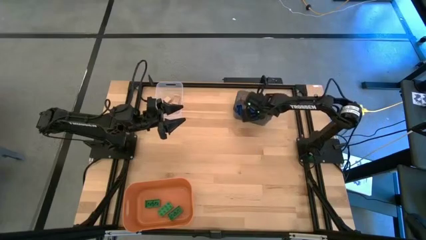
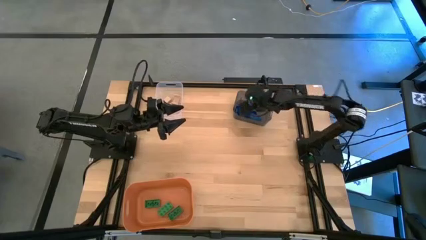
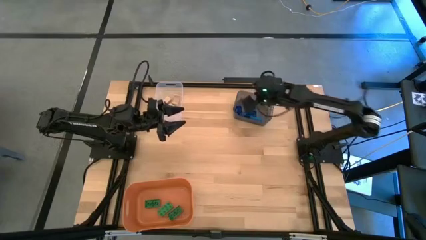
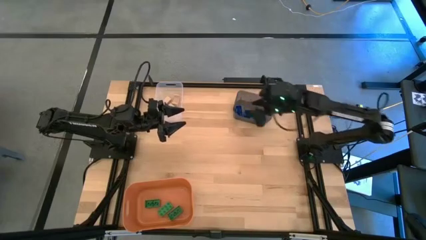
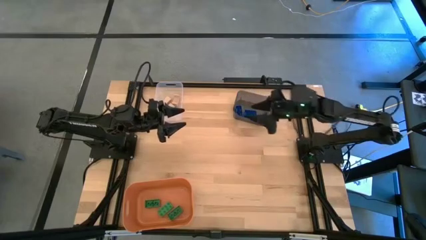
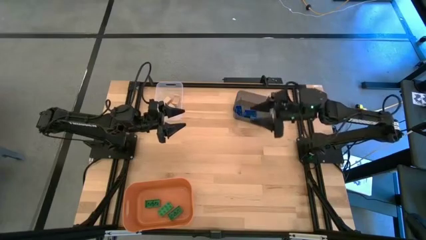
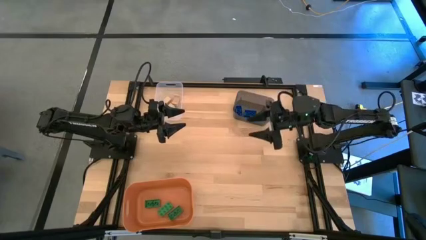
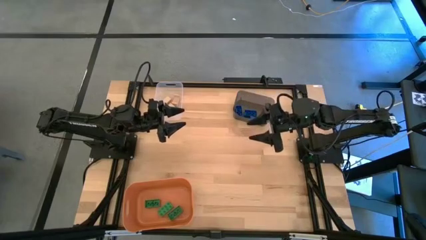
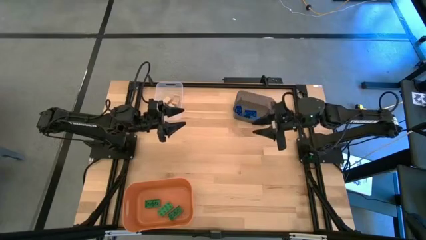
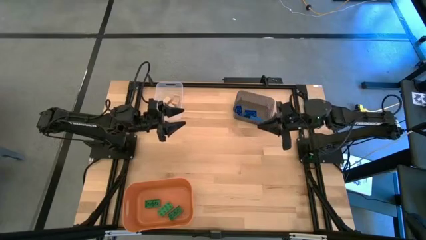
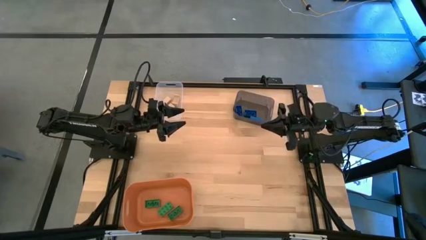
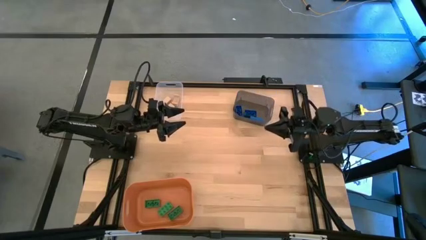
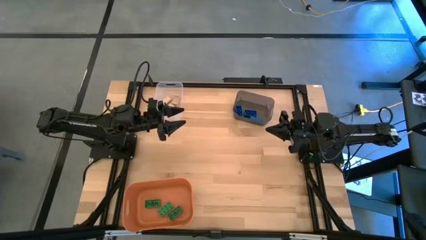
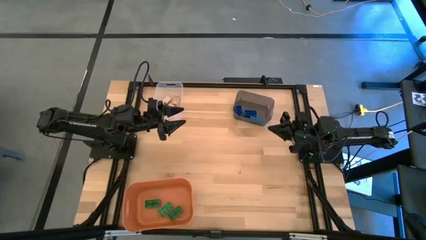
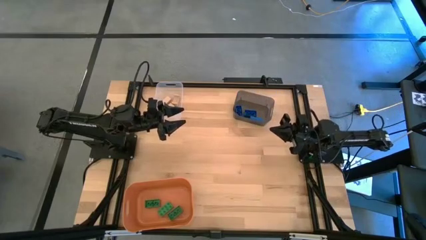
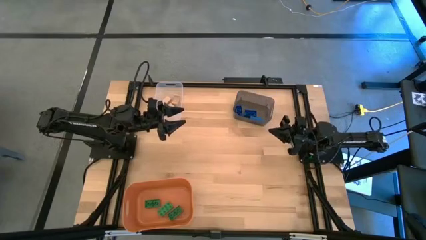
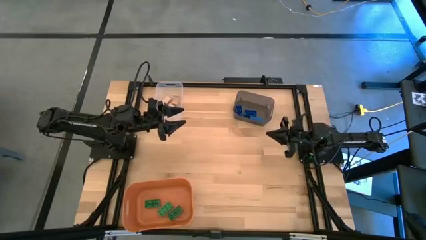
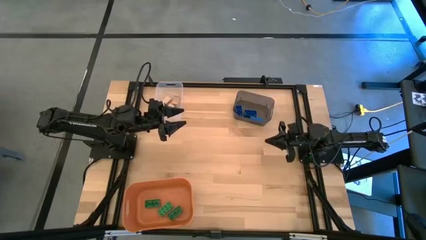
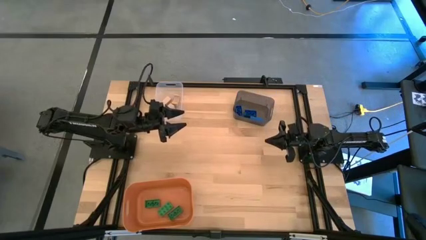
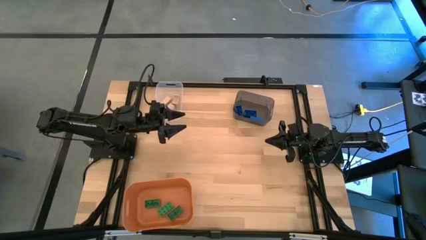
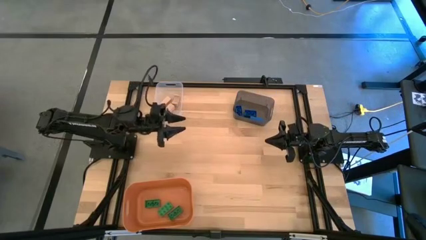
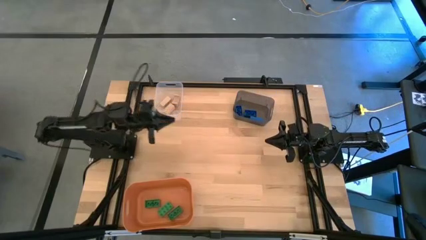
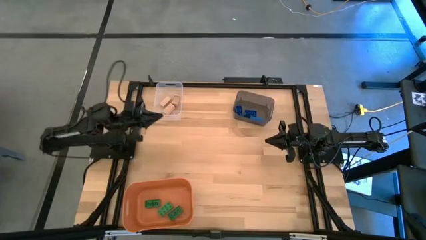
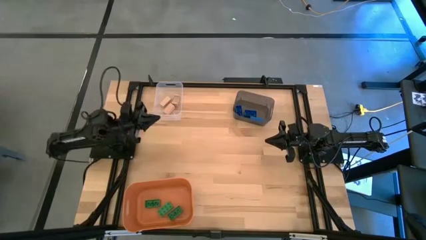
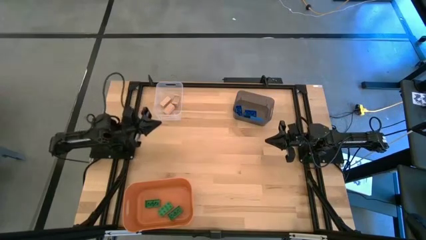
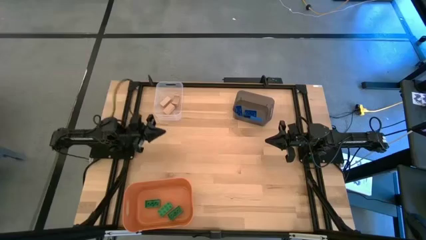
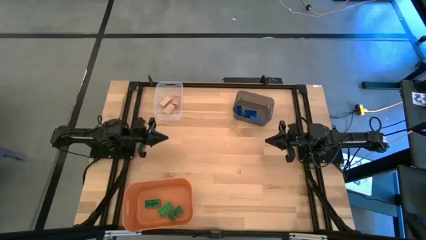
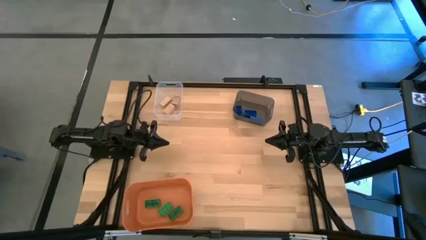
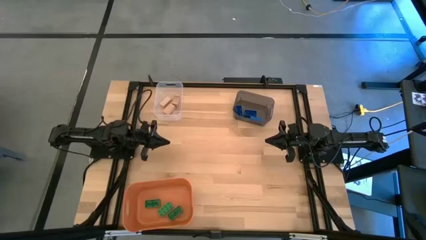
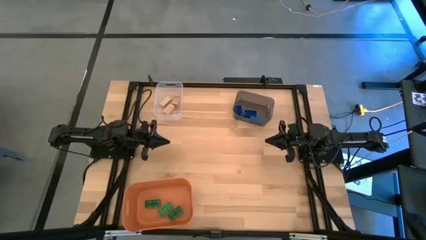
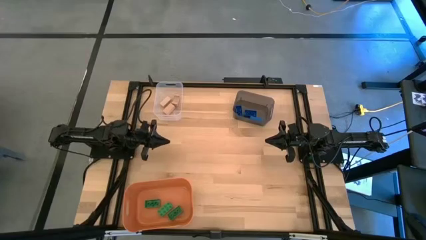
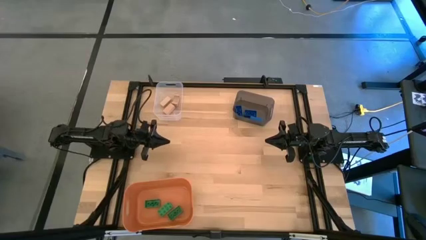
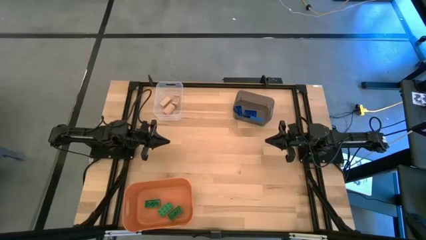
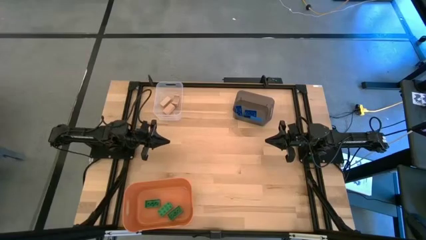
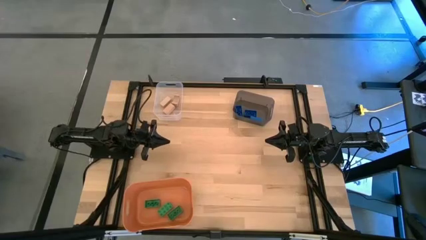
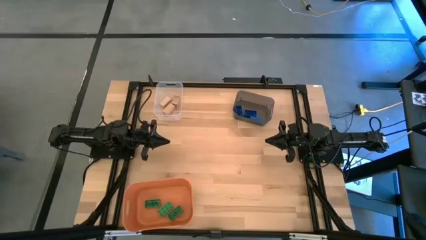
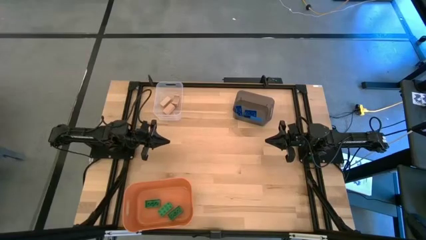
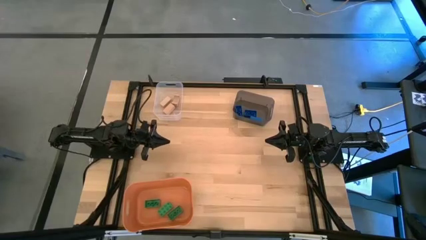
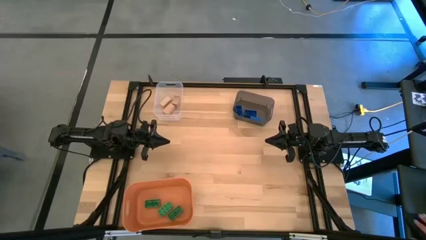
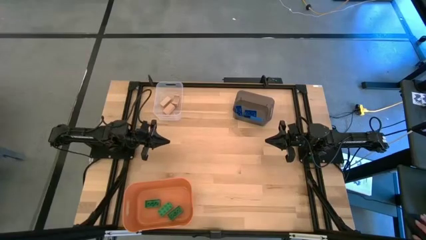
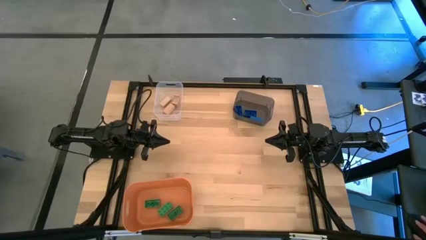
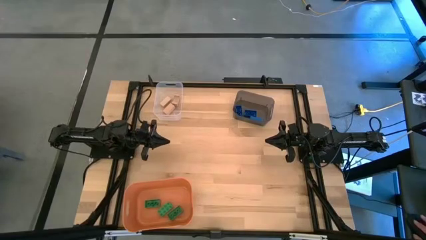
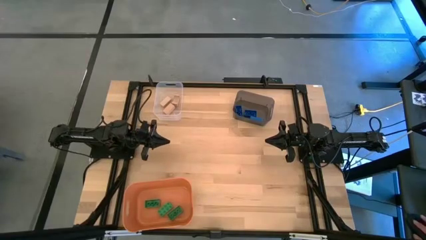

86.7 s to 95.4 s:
Task: Sort & place blocks by color
Return to Home Position

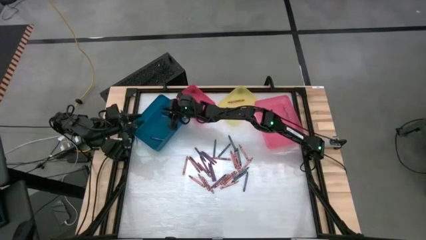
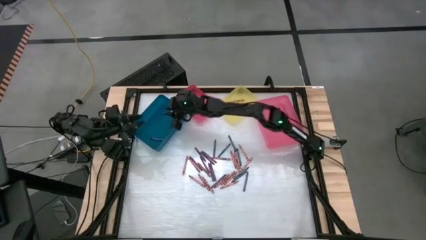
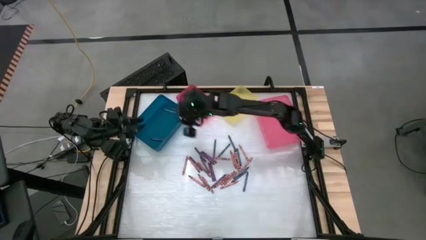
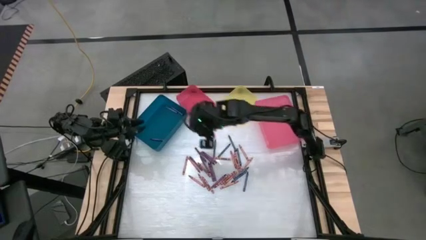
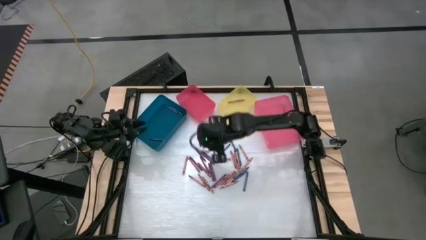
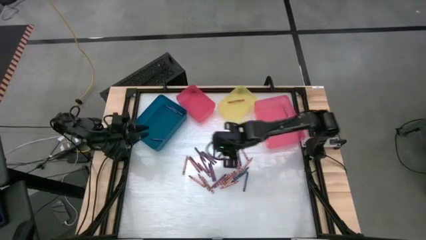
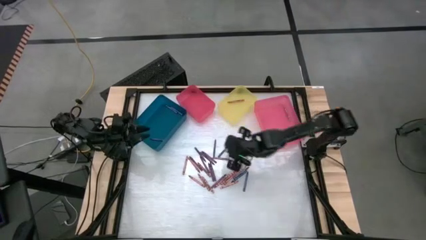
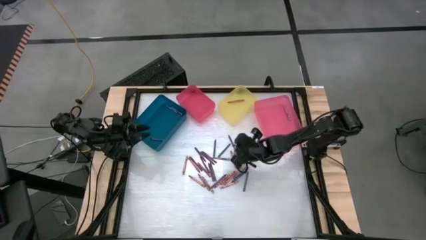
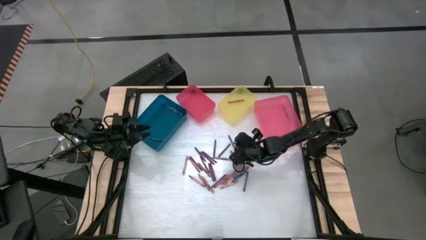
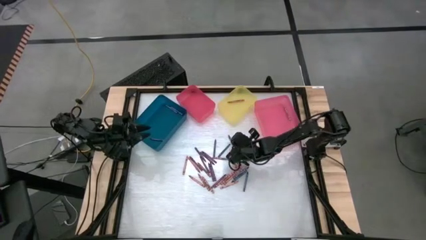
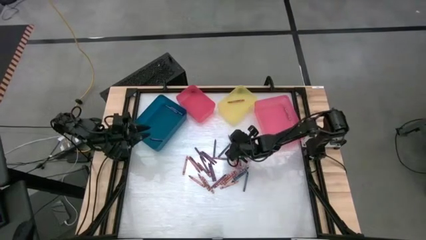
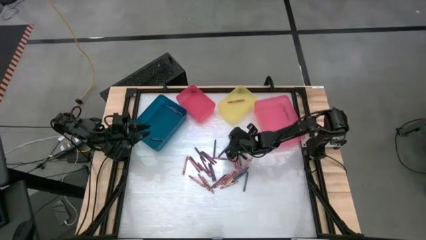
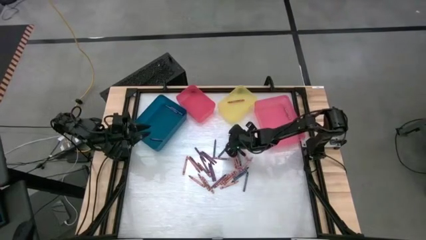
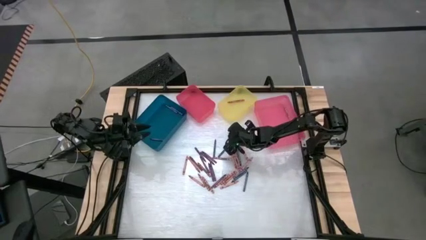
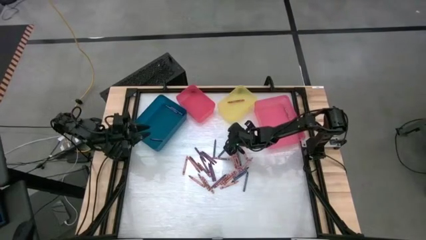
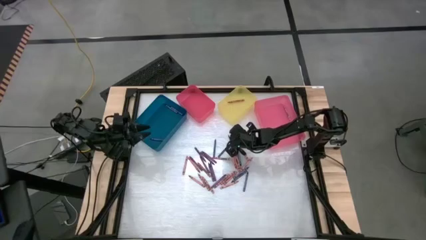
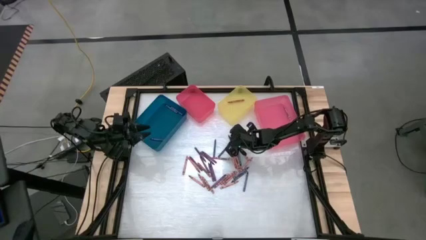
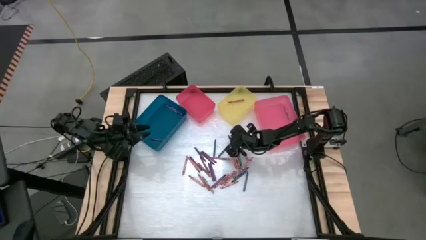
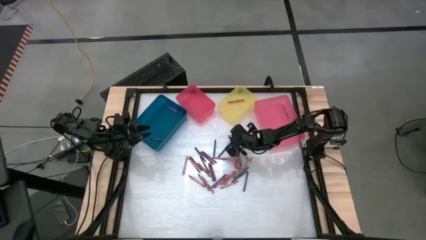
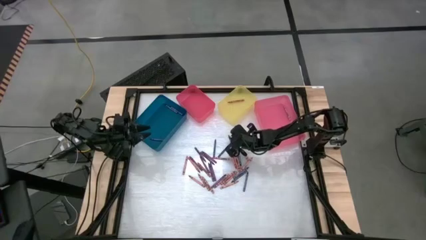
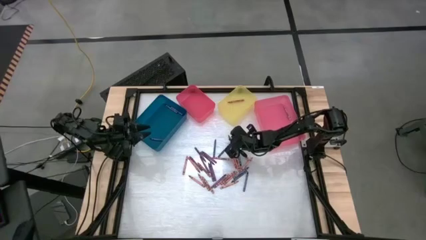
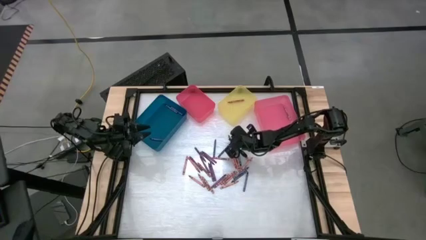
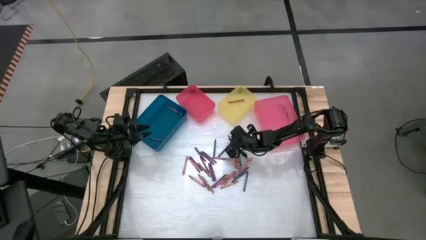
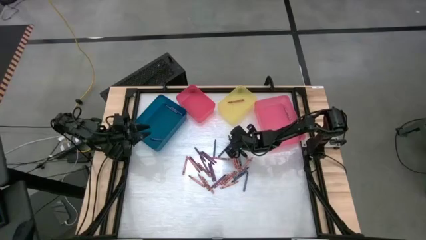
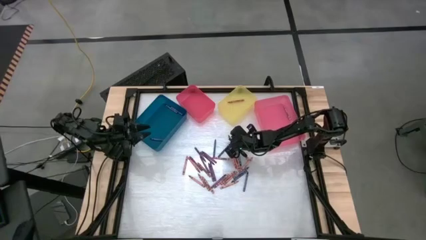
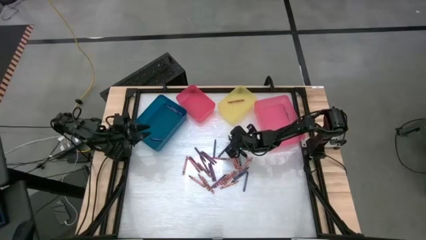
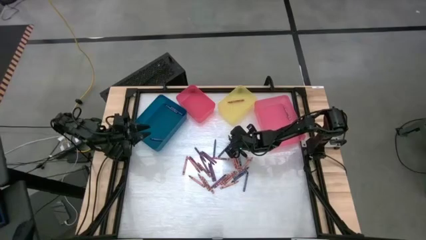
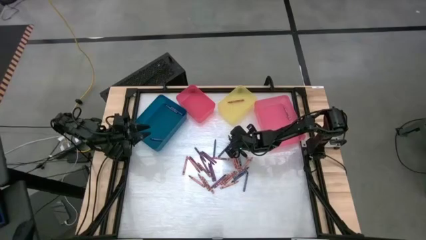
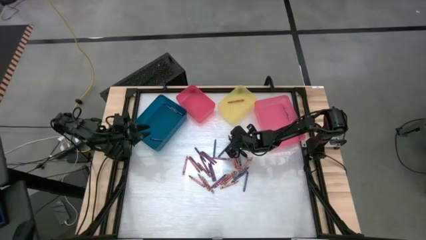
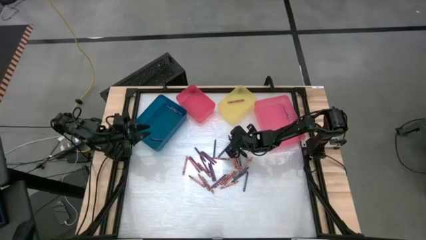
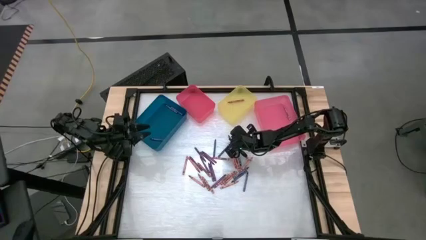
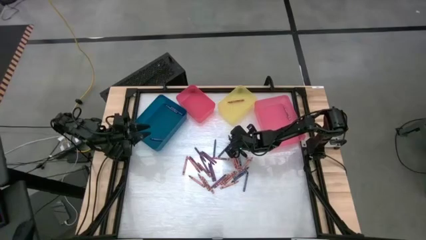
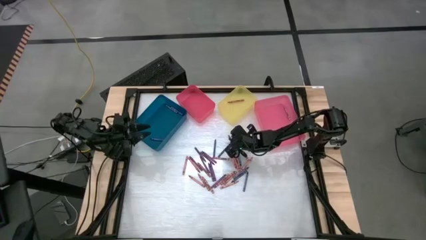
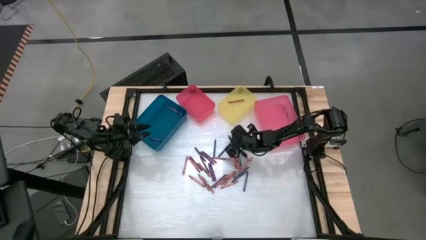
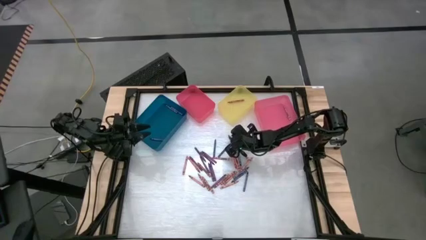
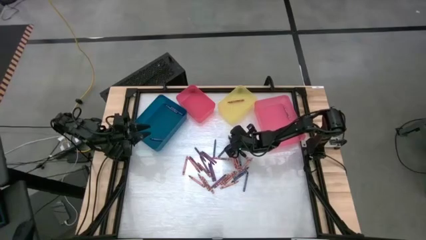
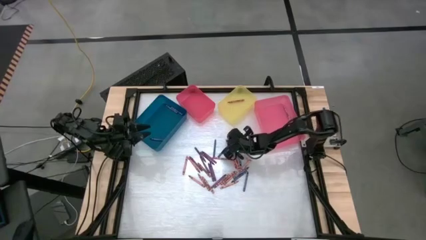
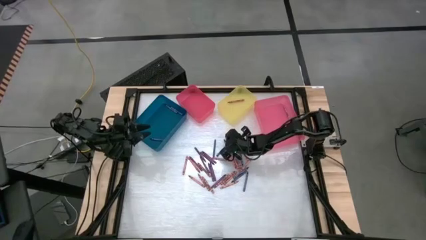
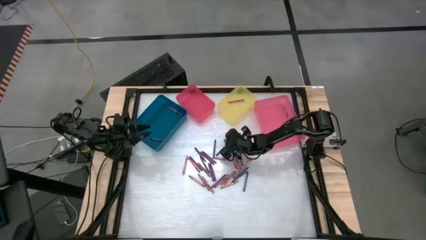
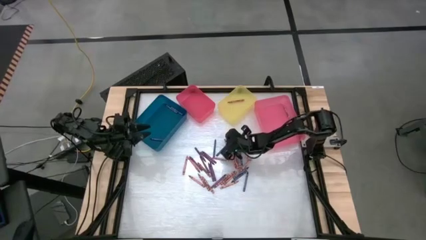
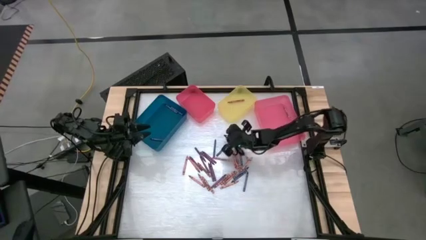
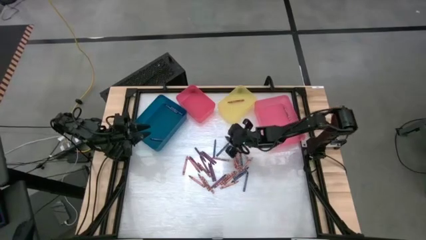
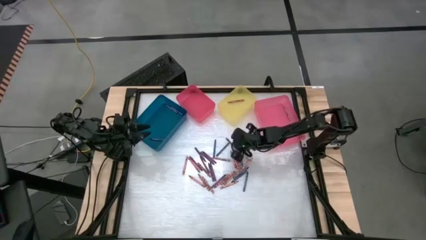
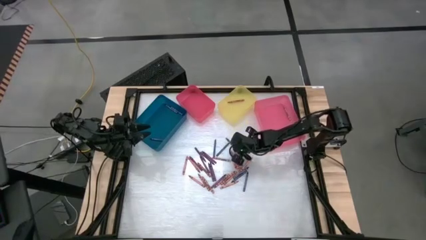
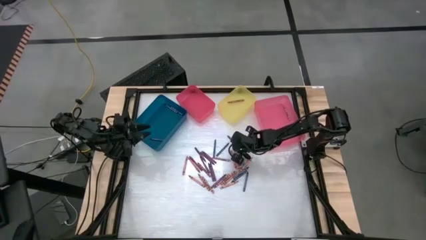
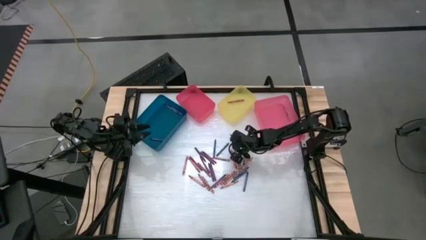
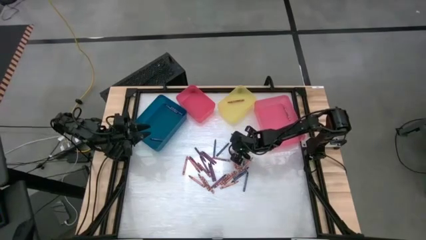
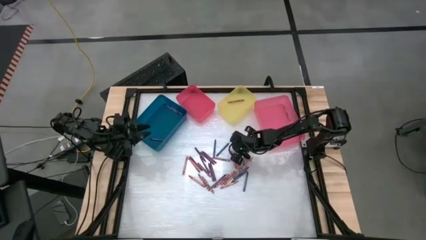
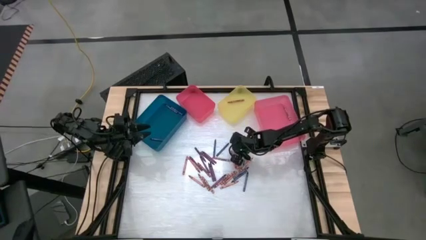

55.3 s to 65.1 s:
Task: Sort crayons
Put the blue crayon into the blue bin
